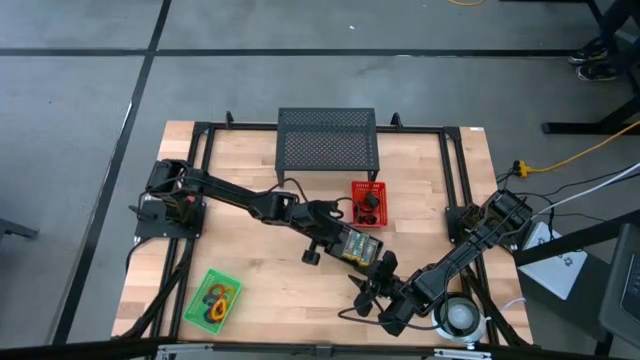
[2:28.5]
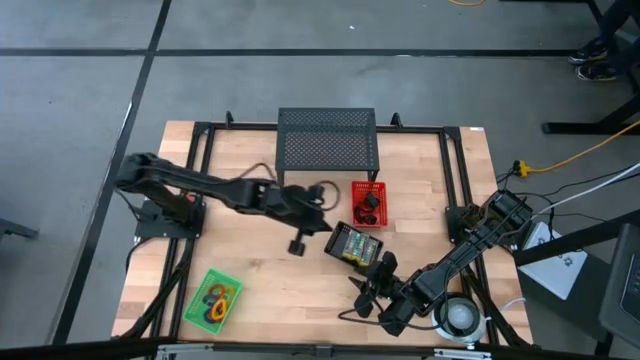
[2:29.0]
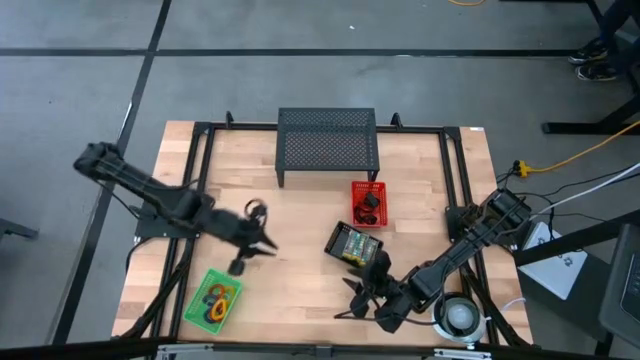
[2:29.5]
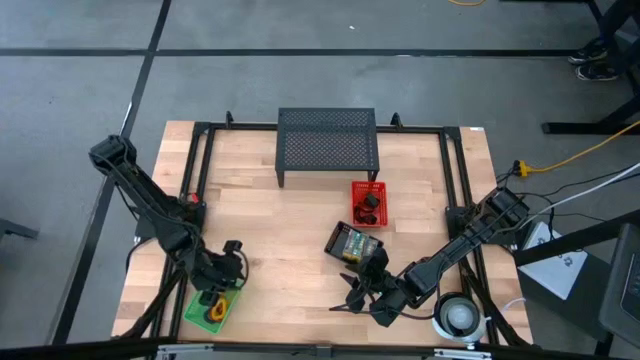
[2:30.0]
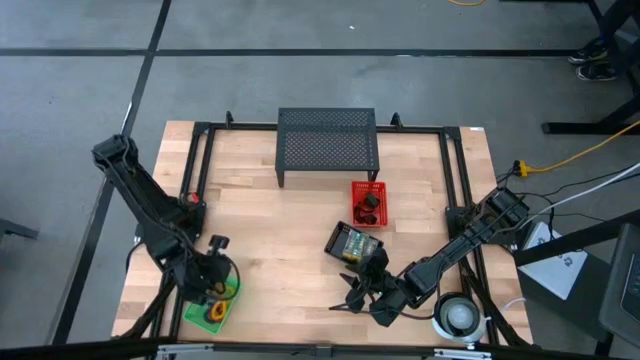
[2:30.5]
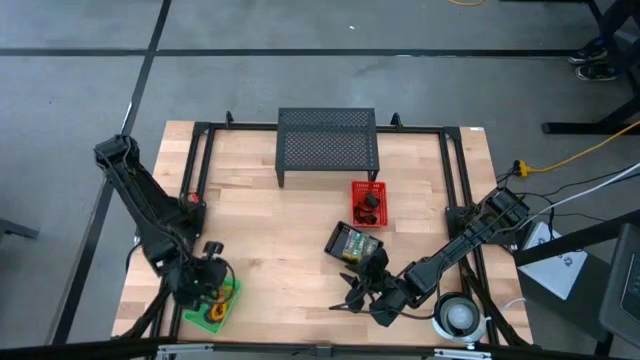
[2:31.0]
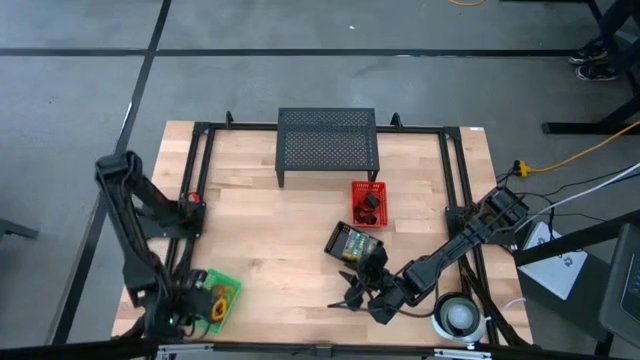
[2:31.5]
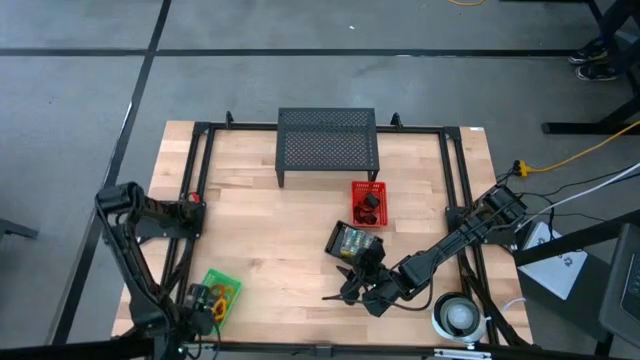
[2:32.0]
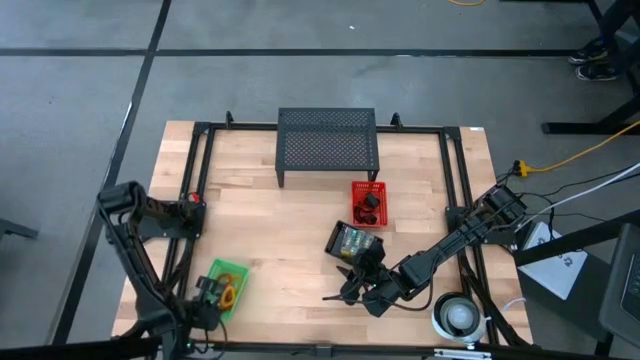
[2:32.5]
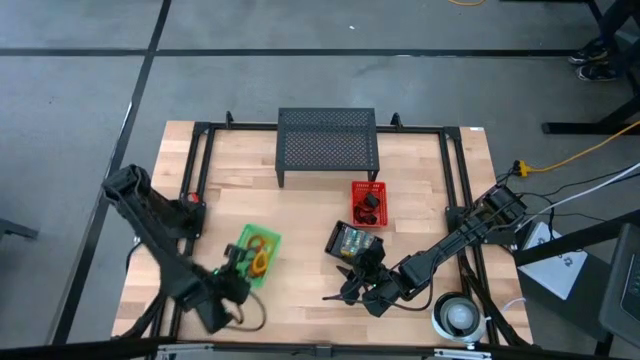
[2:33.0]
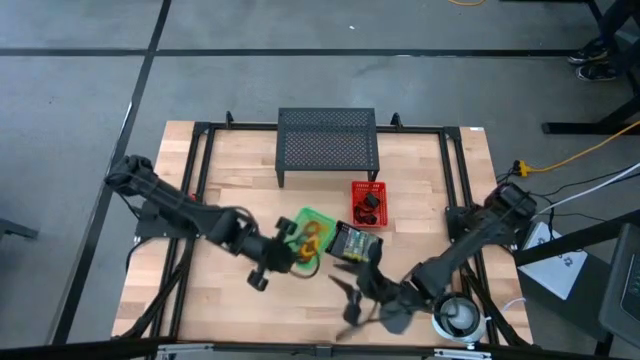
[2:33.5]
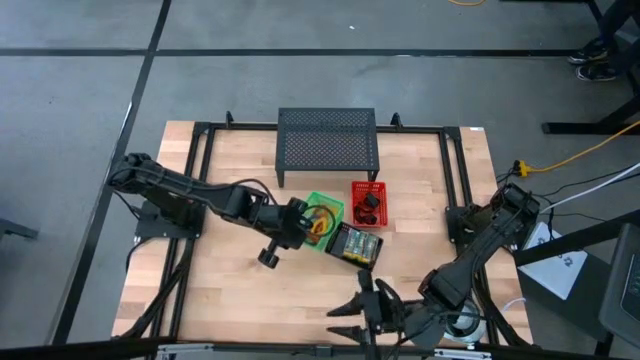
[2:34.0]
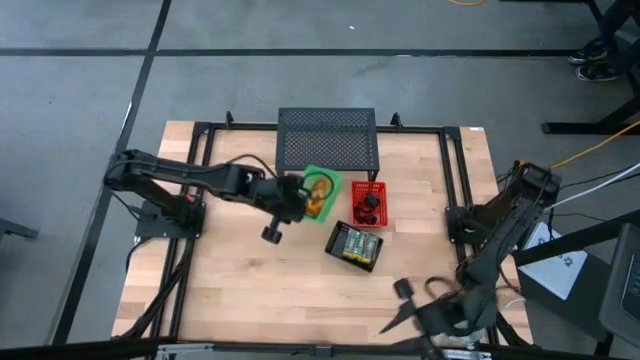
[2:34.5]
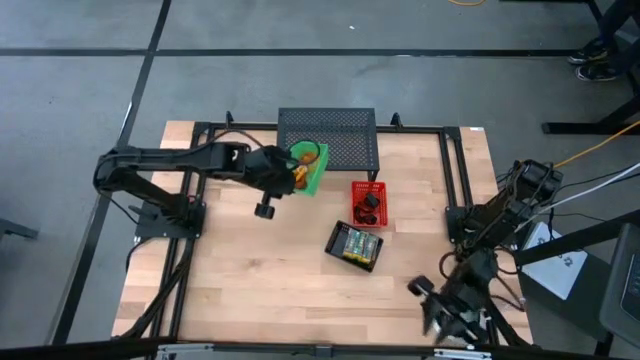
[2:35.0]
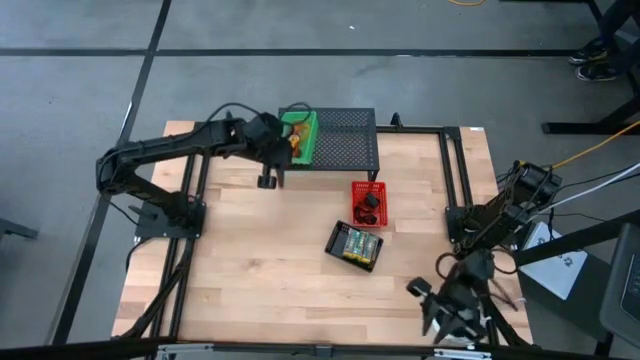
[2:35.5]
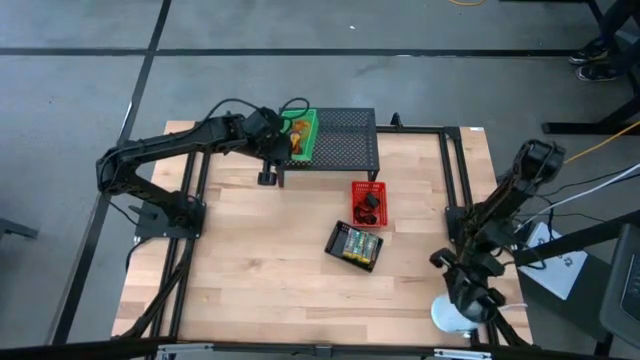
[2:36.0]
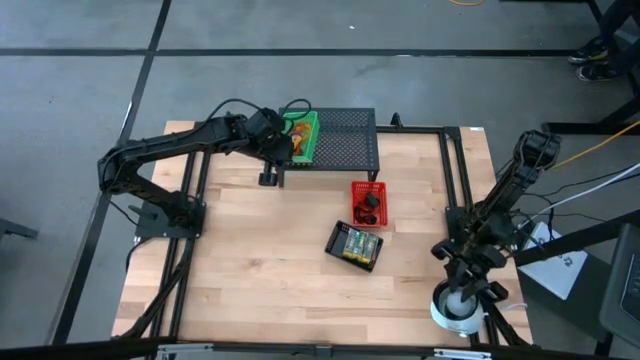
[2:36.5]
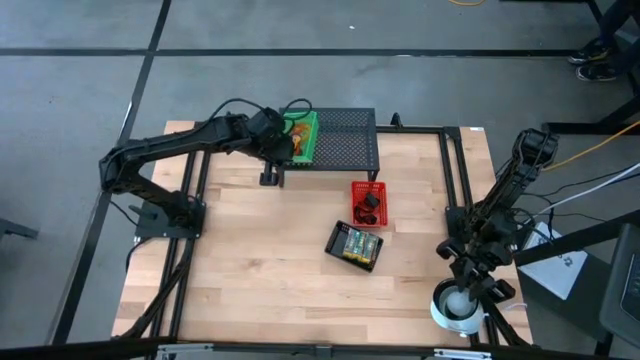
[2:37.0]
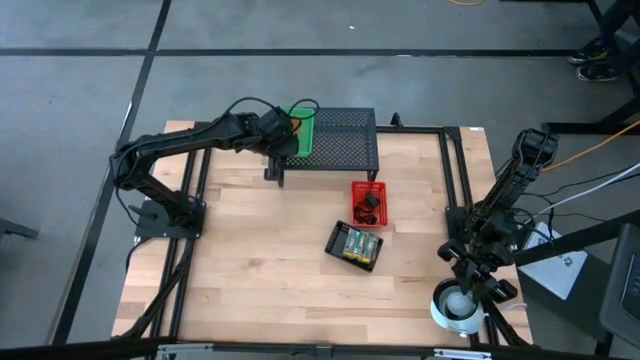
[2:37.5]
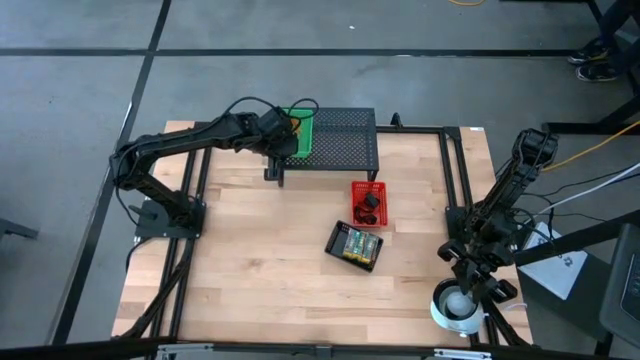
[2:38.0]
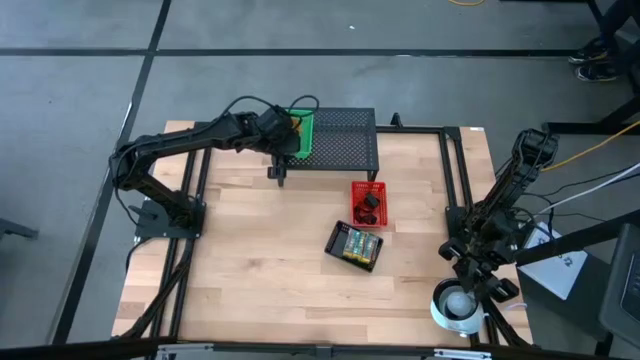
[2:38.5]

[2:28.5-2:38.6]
Task: Pick & Place Office Desk Supplies
Put the green bin on the shelf

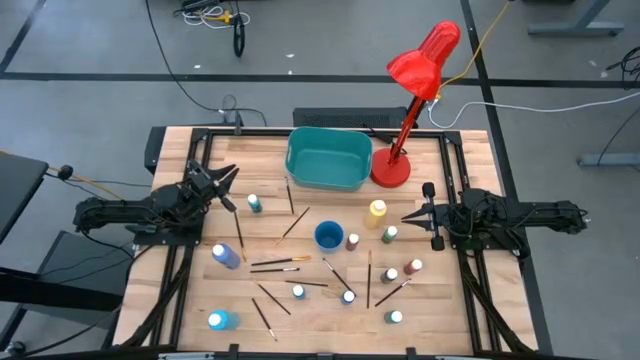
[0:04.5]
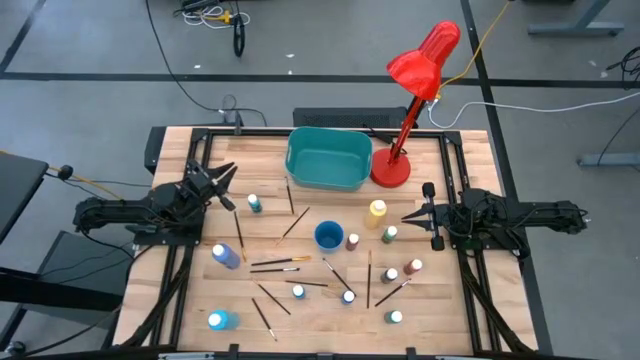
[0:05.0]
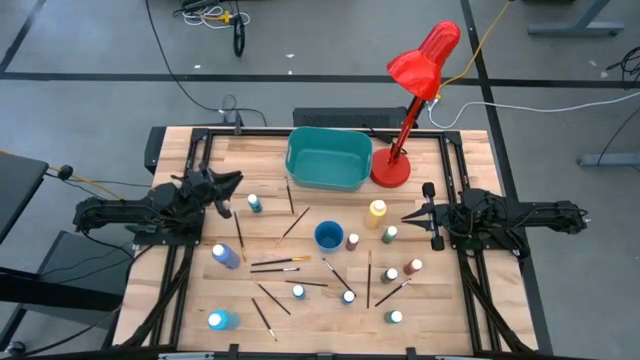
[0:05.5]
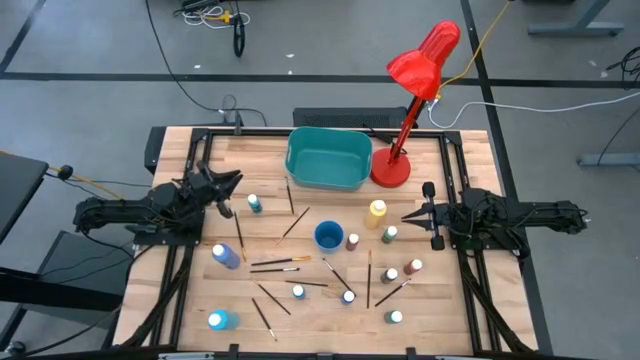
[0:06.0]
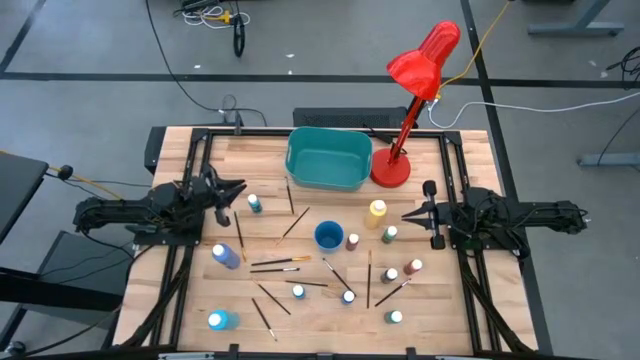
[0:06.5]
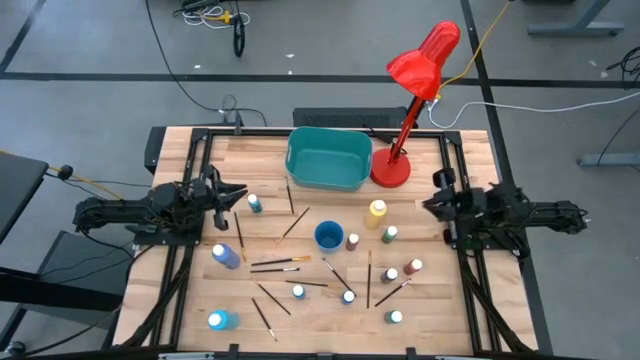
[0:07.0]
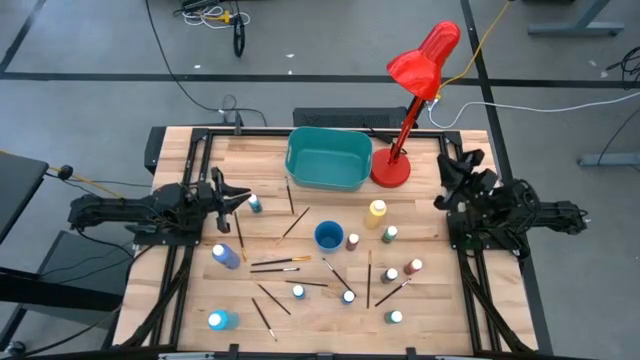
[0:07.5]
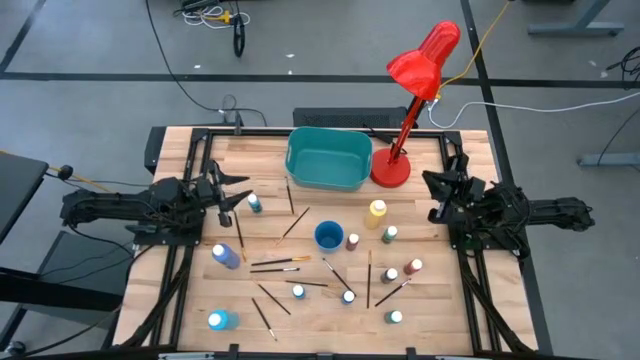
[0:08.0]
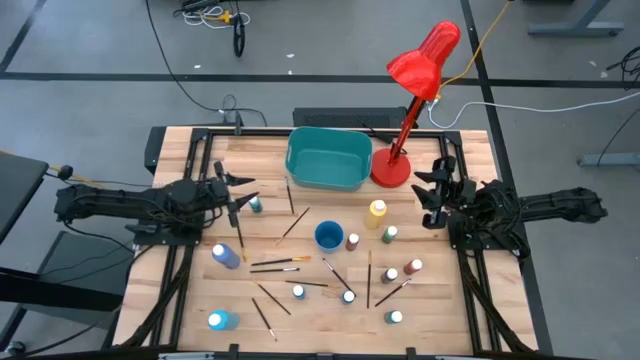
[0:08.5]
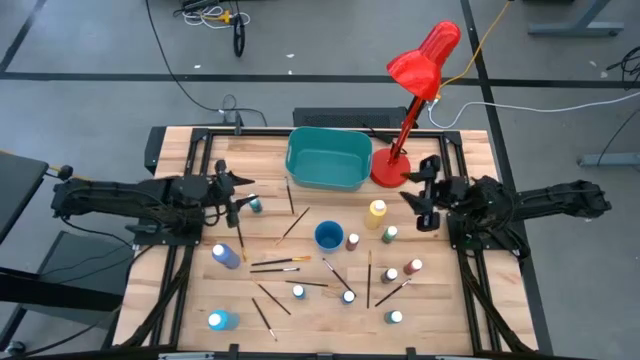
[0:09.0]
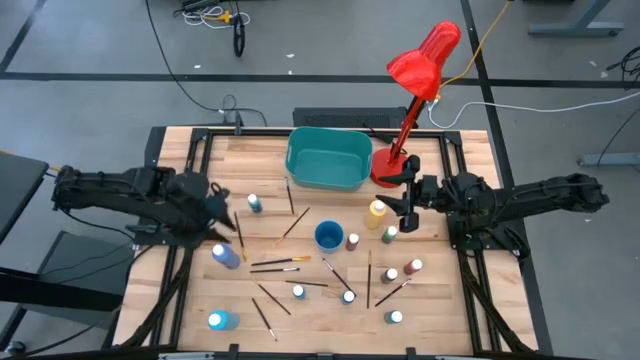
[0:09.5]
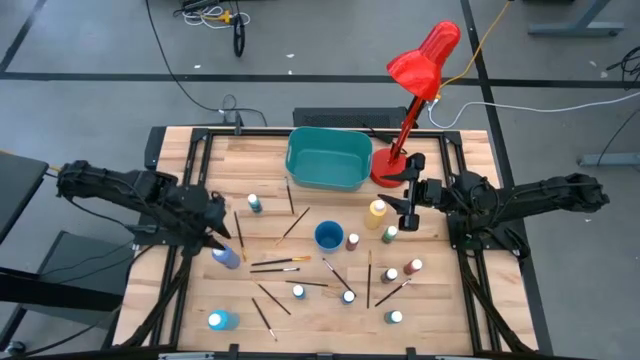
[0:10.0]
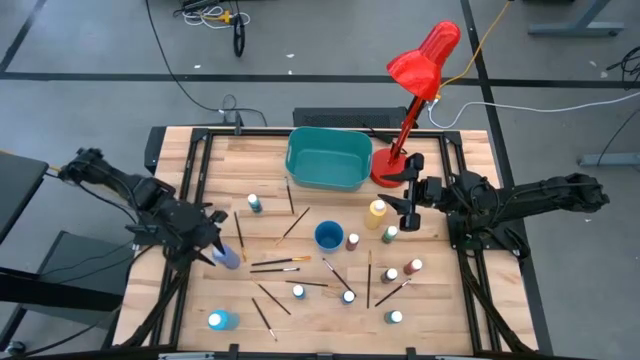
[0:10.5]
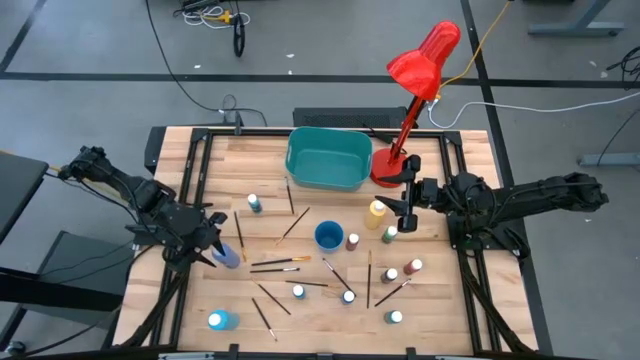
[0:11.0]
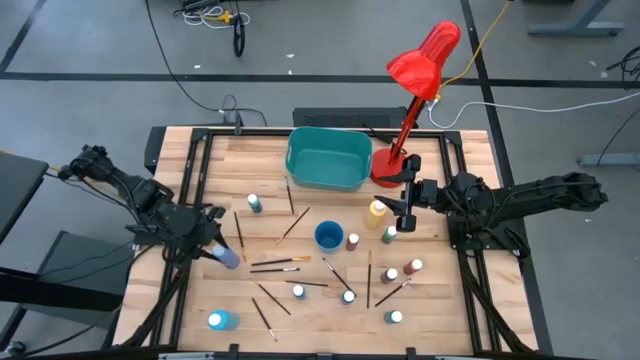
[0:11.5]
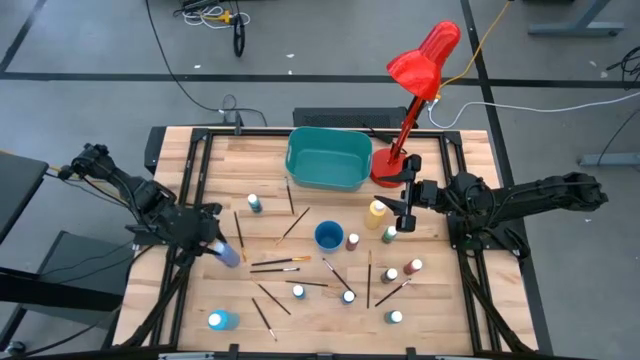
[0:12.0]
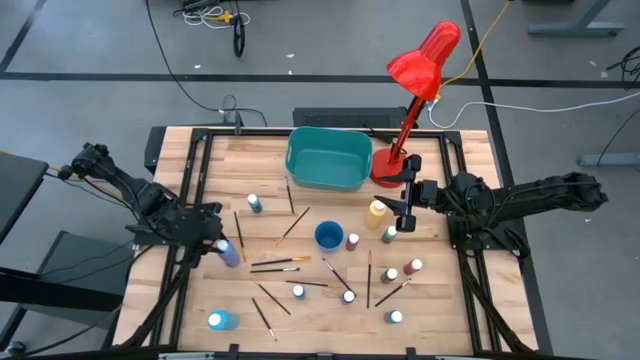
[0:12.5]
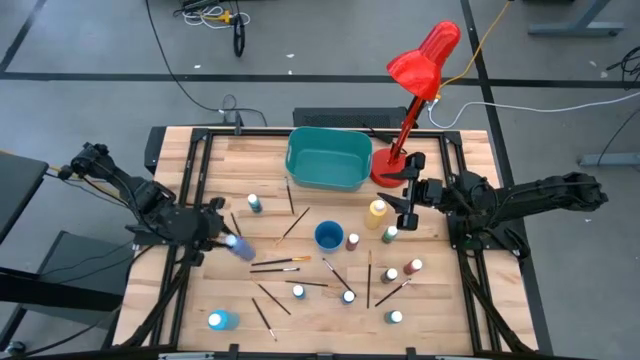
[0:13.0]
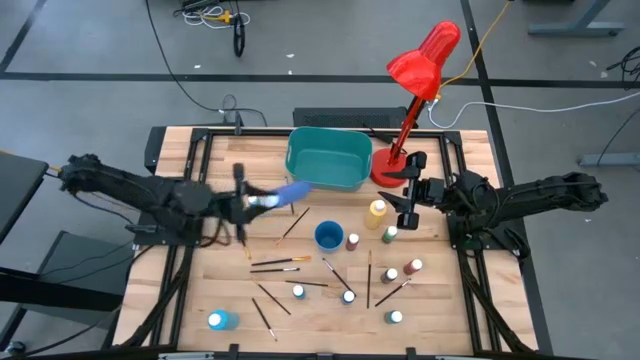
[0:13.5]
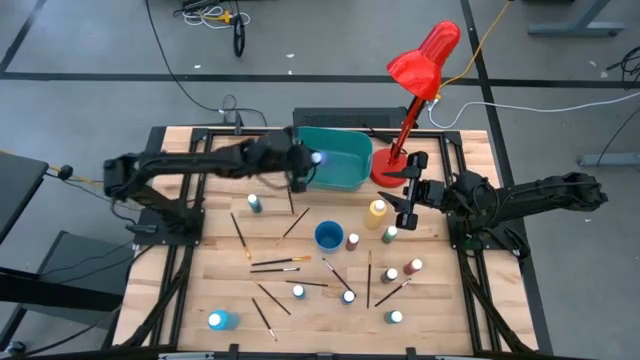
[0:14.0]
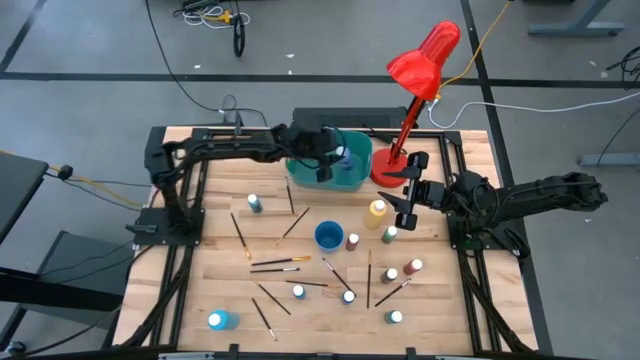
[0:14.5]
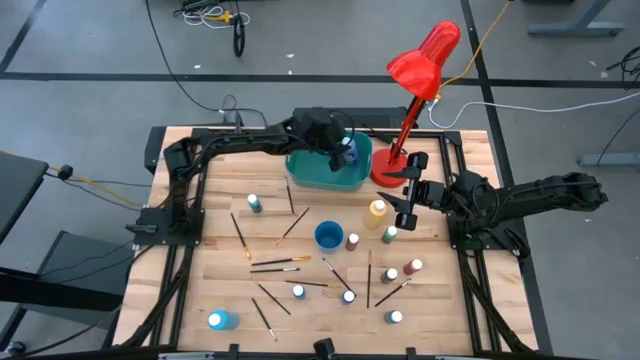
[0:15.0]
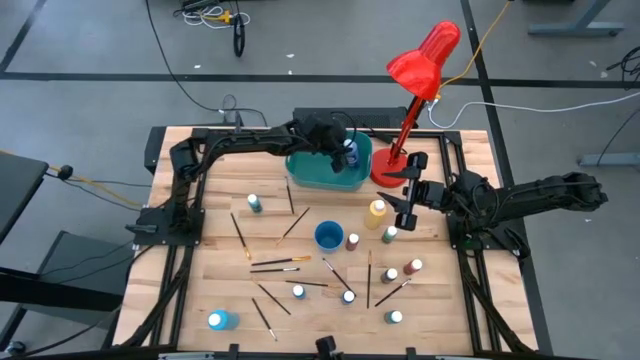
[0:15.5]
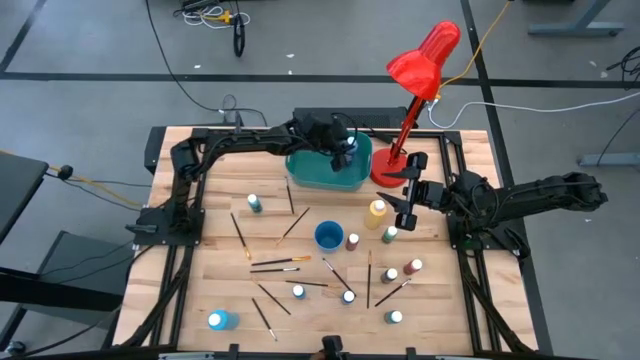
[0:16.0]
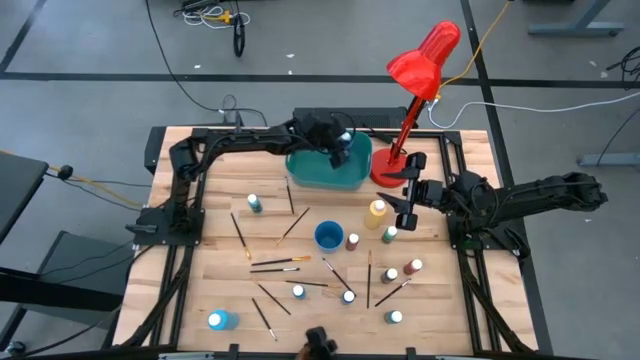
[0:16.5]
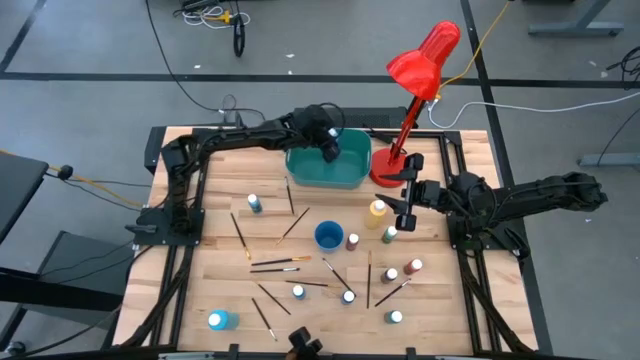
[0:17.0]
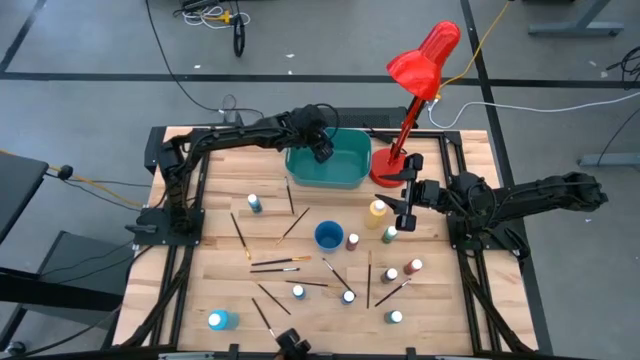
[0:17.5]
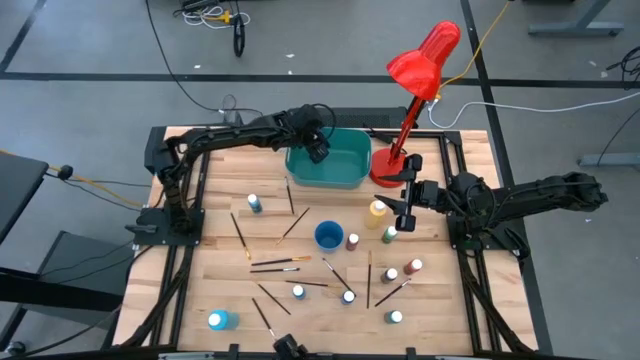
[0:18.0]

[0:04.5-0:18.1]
Task: Pick & Place Paint Supplies
Put the purple paint bottle into the green bin
